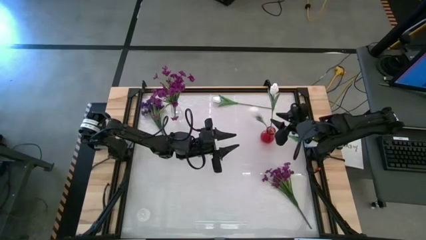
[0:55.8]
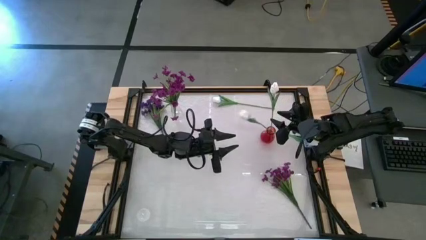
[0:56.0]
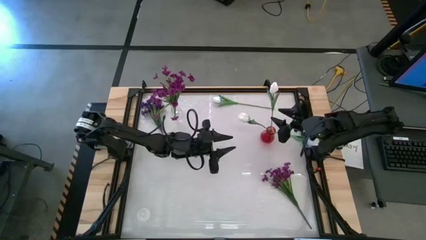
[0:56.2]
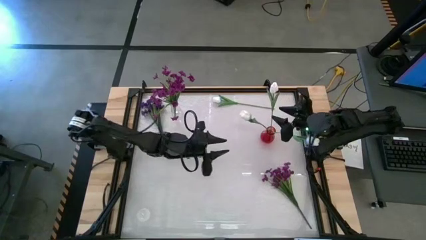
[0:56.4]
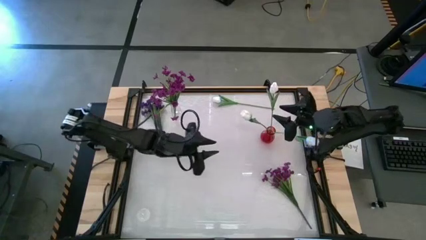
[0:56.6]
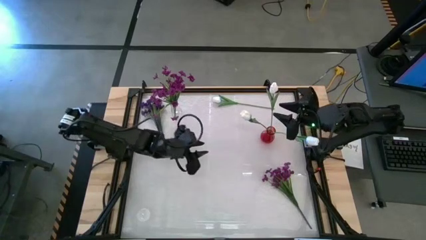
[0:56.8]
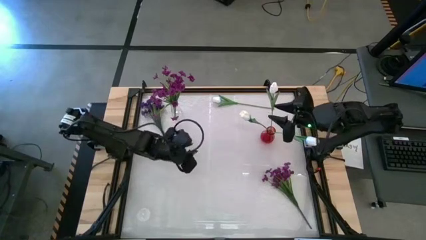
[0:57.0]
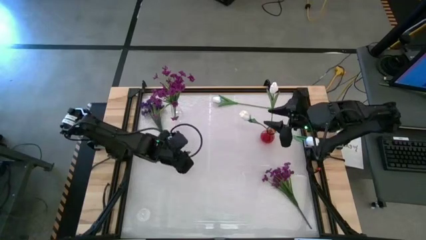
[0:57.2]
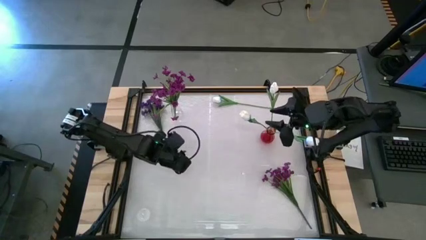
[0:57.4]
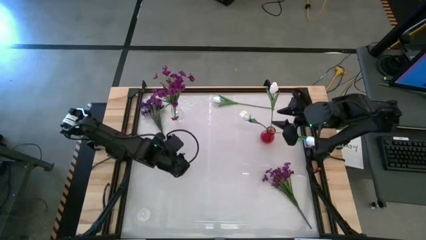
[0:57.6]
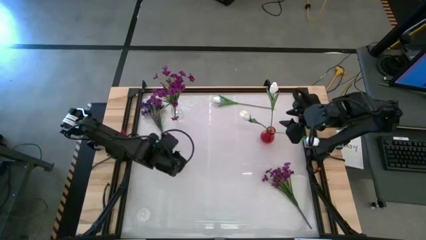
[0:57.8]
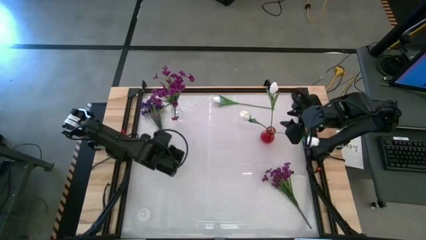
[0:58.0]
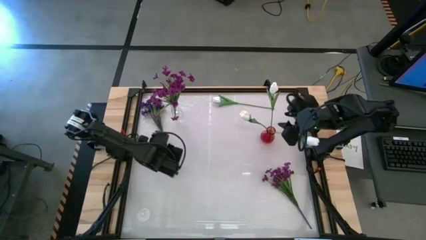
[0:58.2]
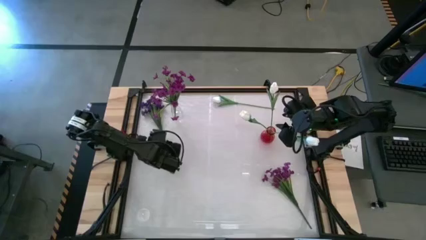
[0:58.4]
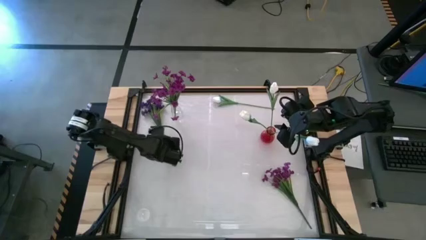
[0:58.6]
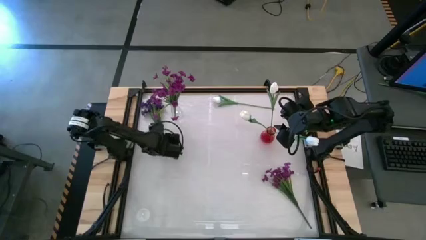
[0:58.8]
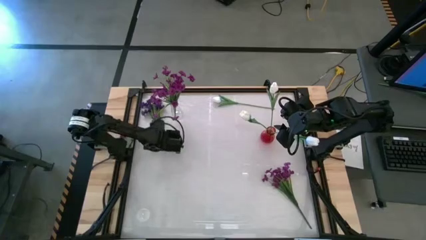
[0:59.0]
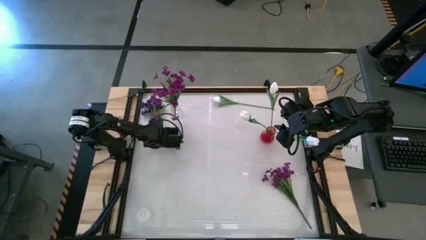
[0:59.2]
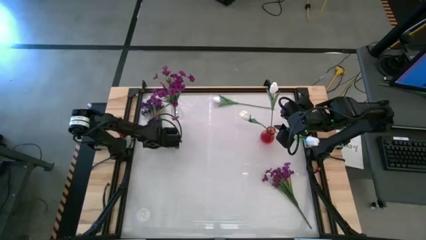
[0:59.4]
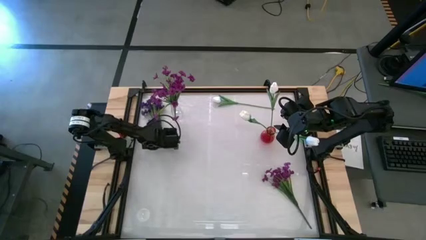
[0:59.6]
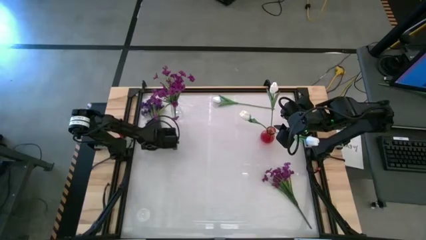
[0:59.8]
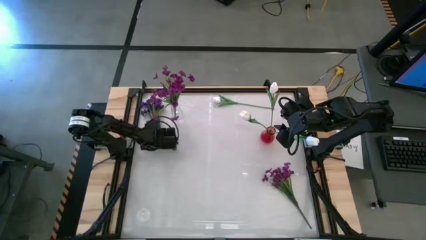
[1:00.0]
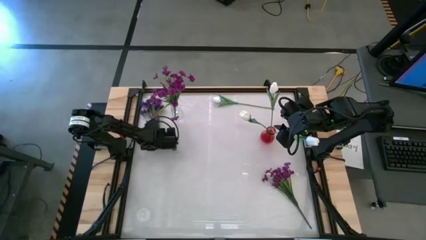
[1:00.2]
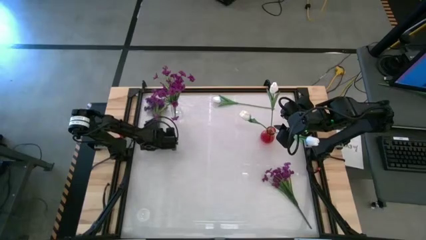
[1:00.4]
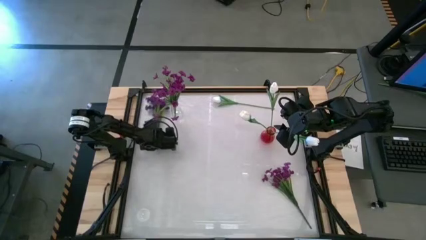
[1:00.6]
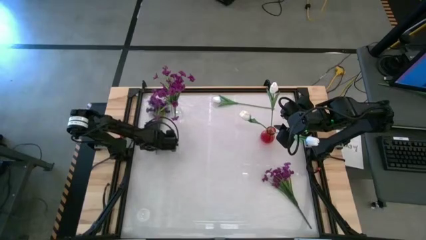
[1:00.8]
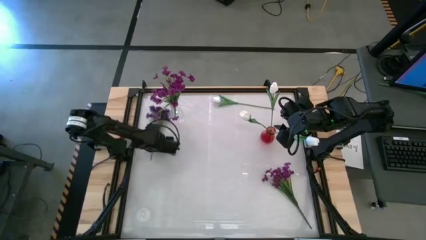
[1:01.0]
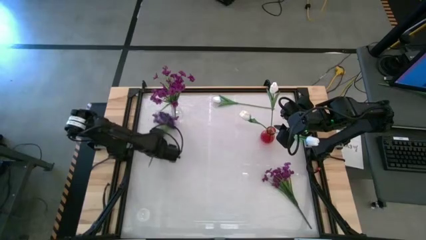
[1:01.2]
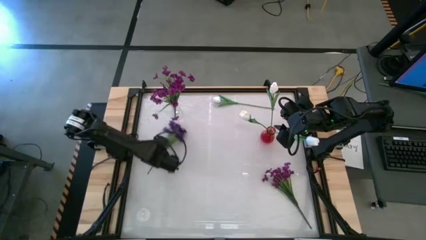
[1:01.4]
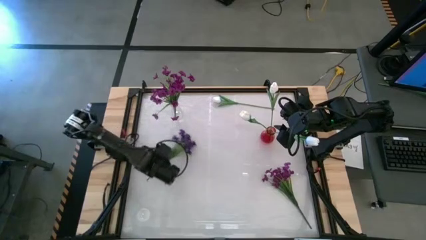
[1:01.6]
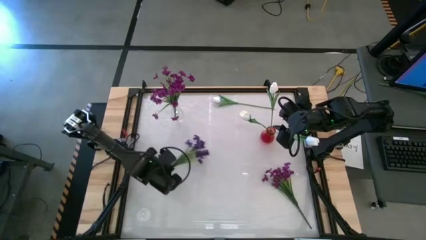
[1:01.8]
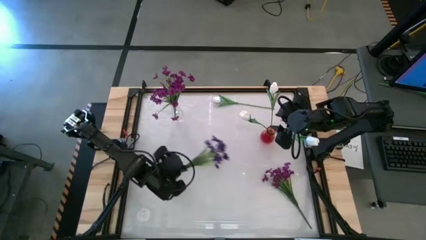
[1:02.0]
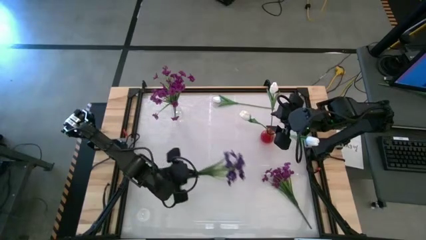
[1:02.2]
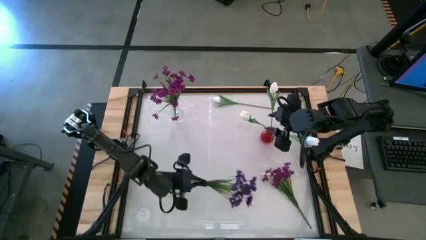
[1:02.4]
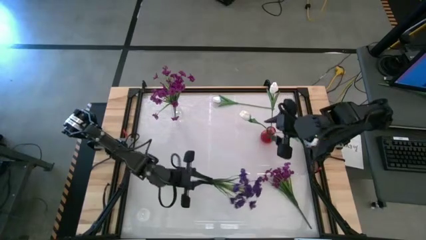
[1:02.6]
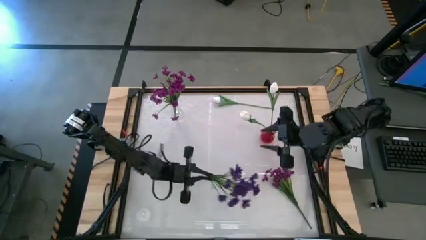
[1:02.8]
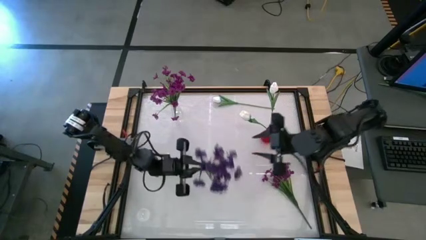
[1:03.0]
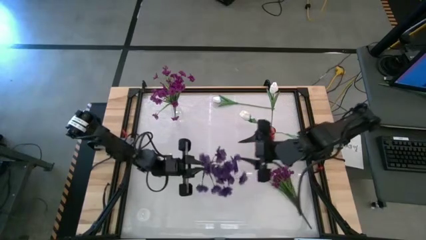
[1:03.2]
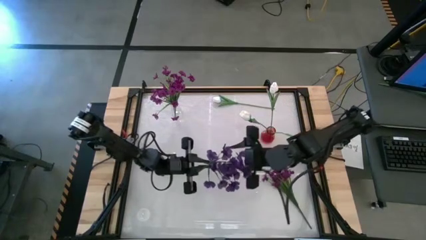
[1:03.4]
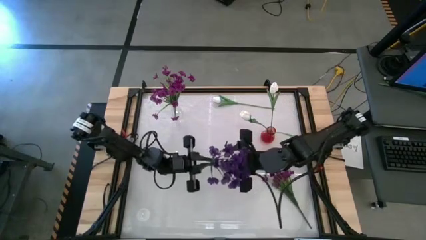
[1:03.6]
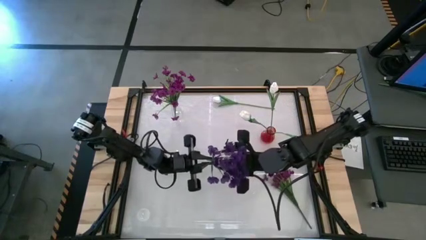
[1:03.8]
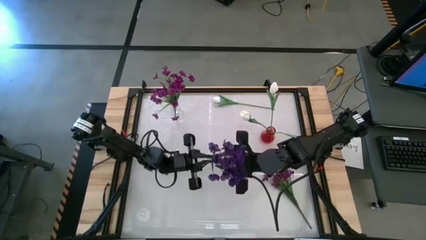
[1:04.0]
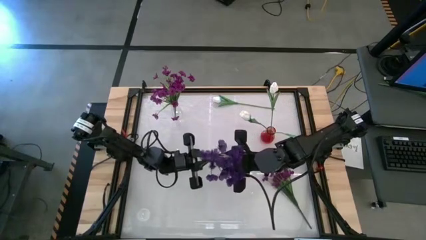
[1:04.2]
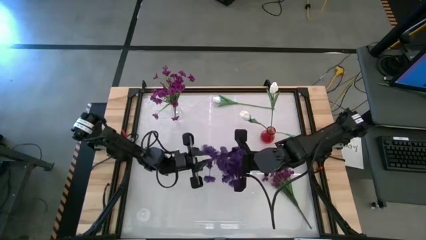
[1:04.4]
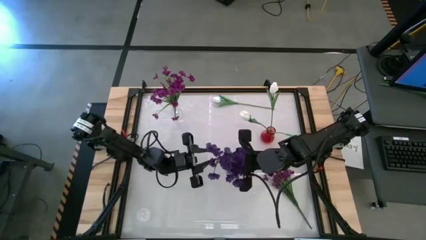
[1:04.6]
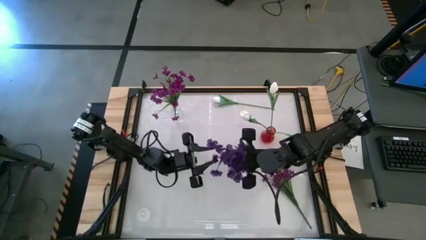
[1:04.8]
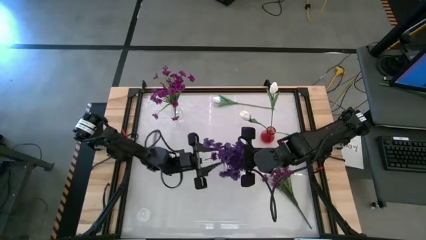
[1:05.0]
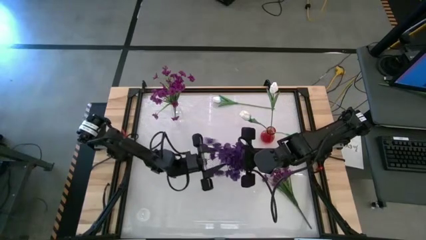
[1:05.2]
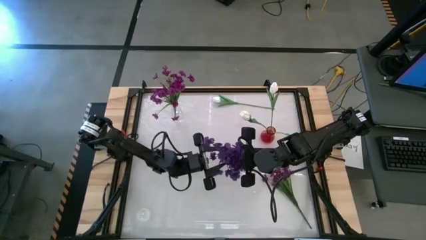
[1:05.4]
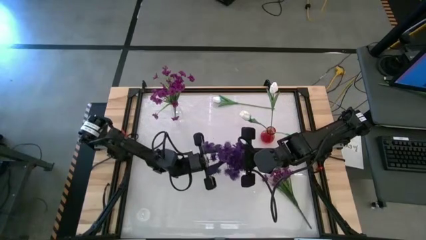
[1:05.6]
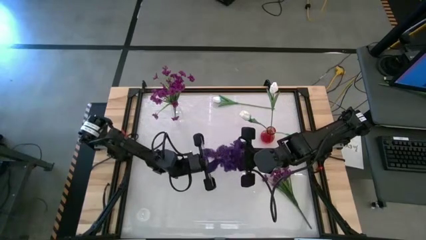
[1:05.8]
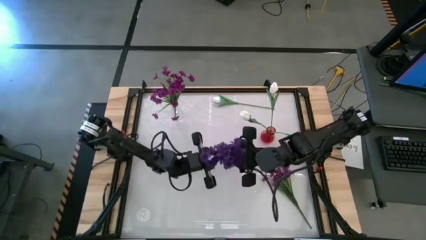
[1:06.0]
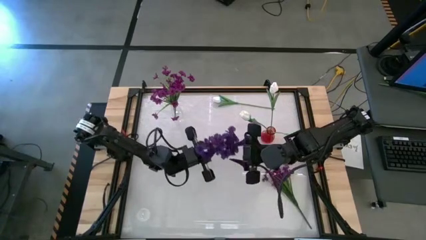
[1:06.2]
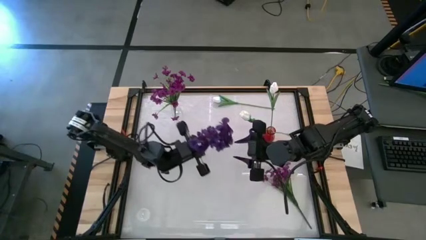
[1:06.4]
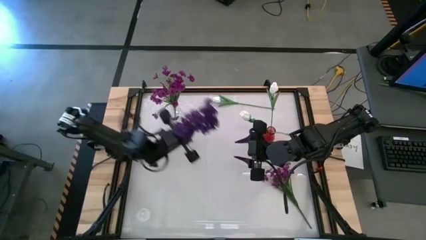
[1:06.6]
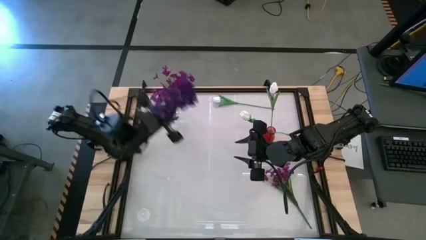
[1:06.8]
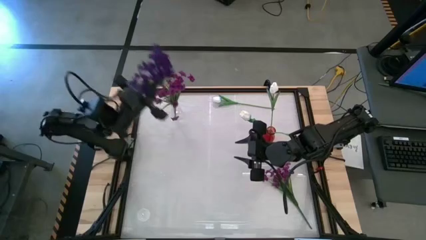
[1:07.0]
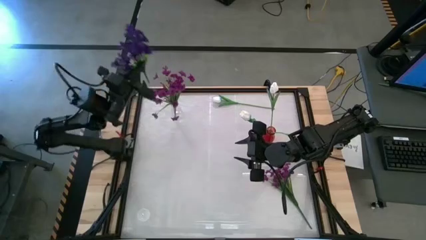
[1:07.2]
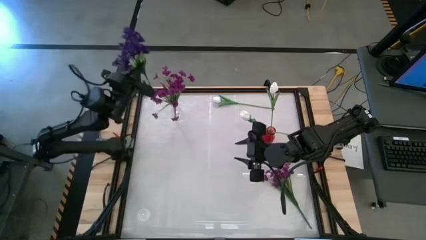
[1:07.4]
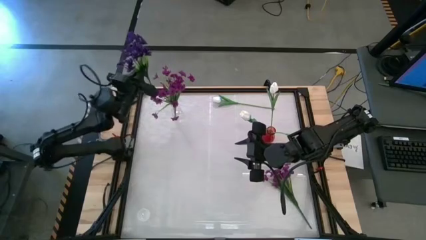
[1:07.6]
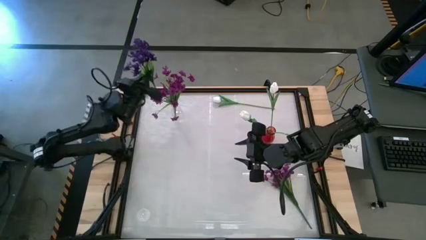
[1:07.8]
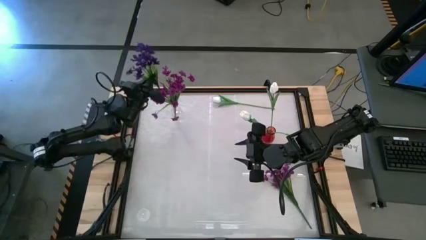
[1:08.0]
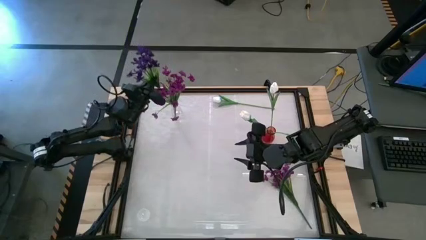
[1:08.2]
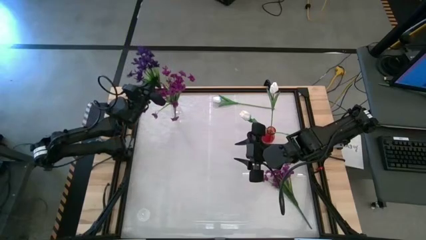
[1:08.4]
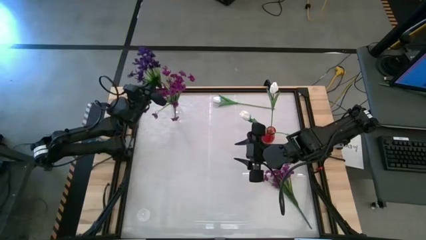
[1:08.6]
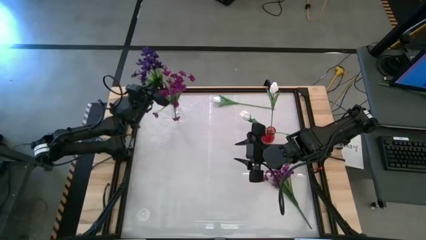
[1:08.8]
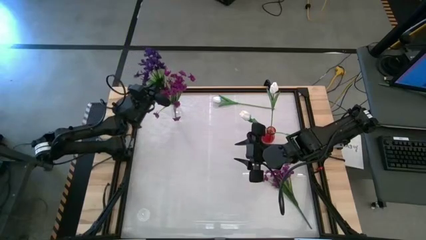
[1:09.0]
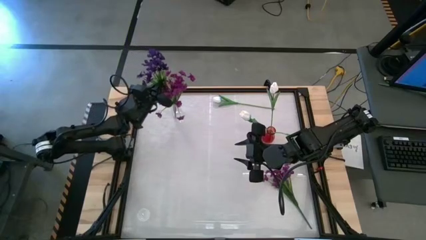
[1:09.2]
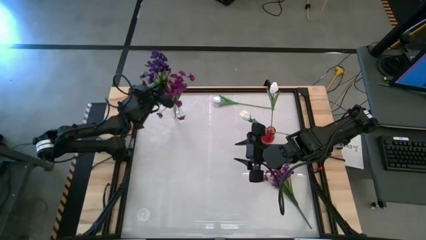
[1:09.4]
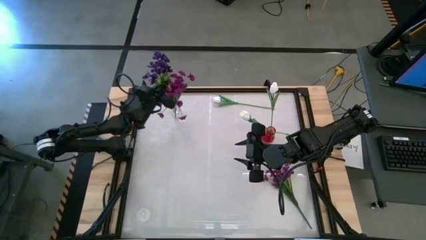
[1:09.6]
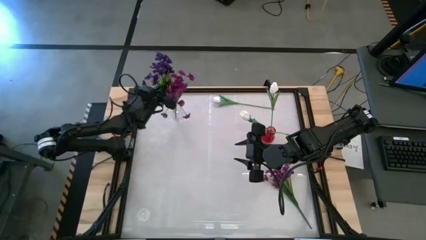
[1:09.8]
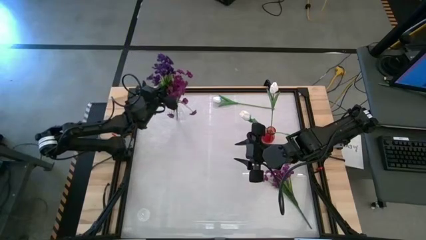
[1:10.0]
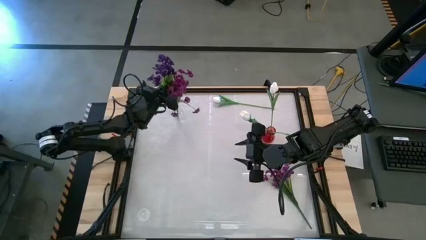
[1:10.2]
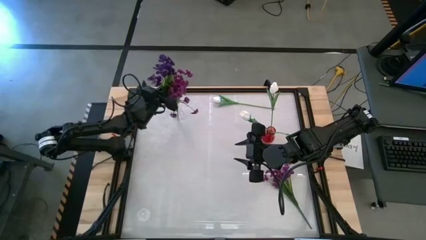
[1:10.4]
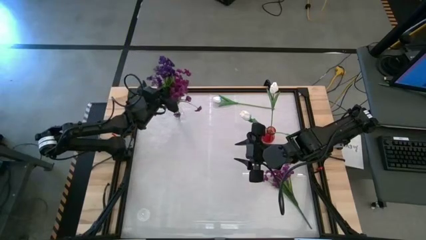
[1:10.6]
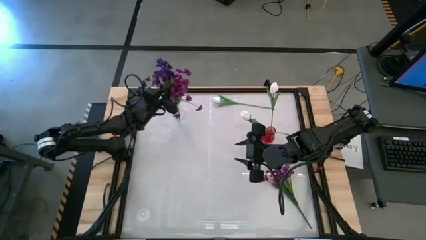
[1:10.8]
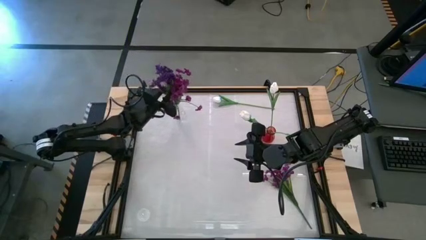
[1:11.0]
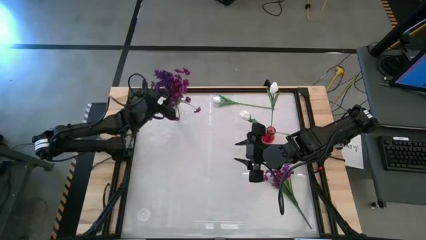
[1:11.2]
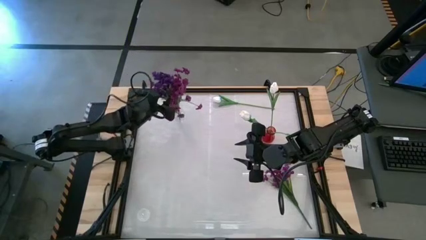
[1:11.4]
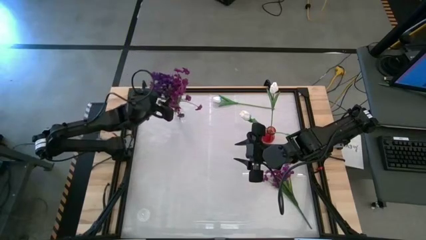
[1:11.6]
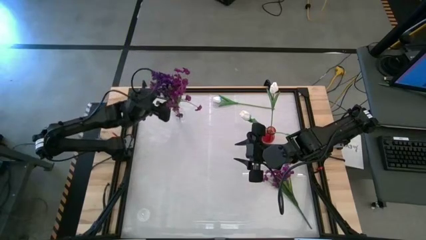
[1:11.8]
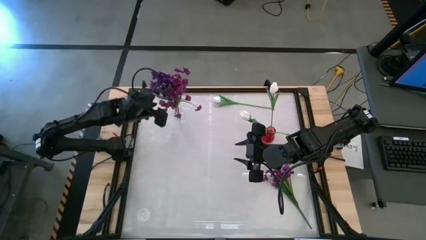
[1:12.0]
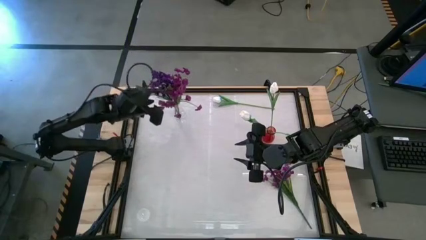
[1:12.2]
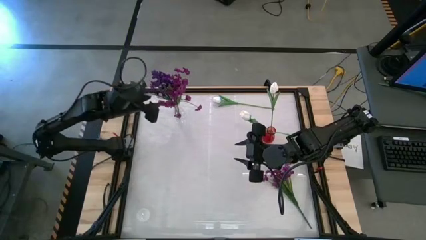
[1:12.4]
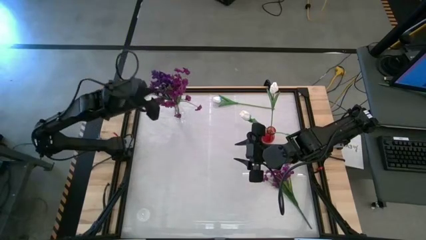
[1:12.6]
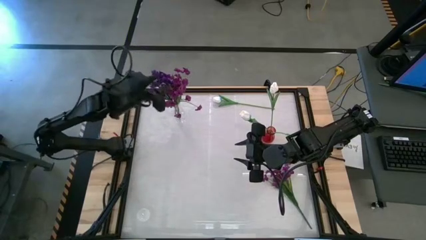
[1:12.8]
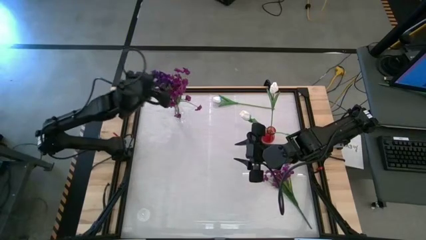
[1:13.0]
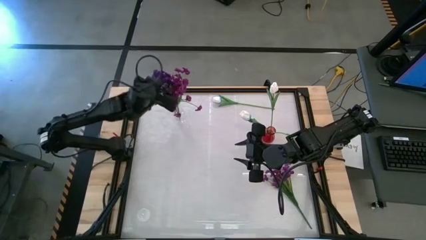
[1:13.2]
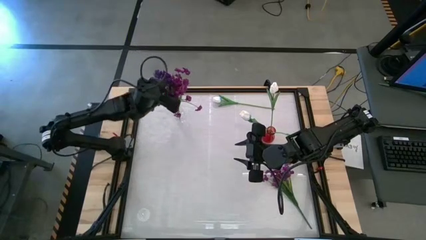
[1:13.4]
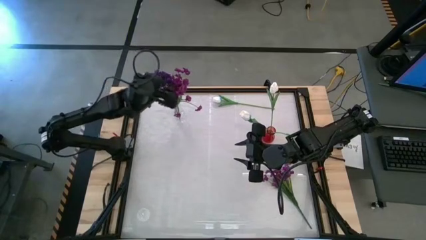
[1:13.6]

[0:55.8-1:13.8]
Task: Sort flowers into vase by color
Put the violet flower into the transparent vase
